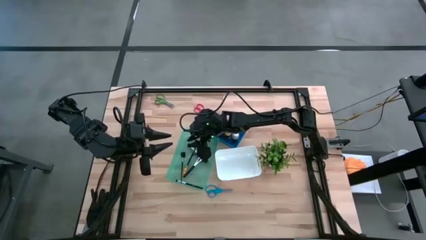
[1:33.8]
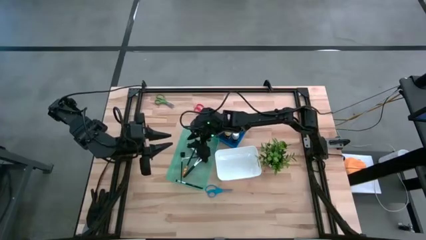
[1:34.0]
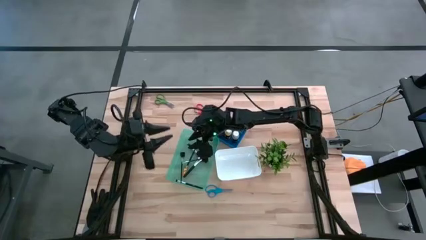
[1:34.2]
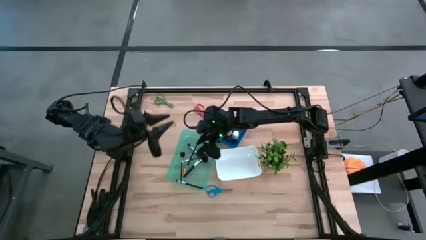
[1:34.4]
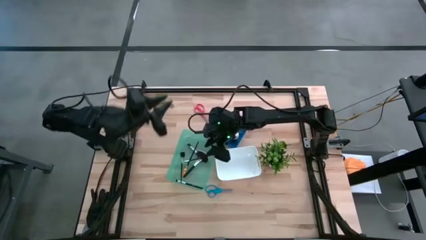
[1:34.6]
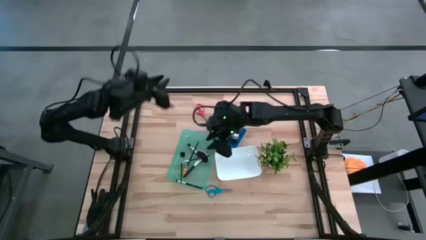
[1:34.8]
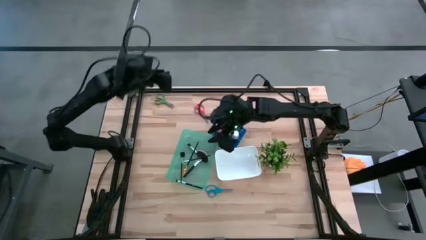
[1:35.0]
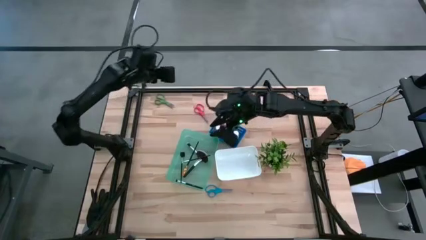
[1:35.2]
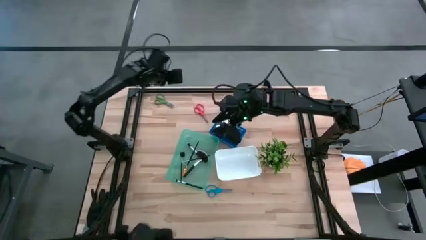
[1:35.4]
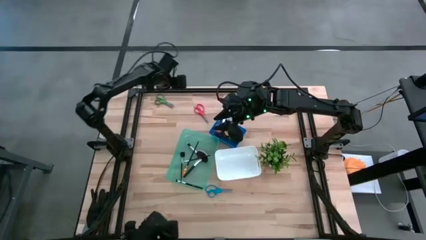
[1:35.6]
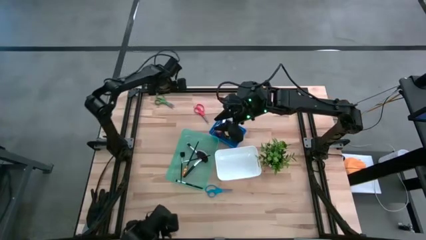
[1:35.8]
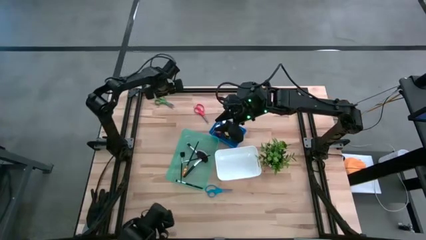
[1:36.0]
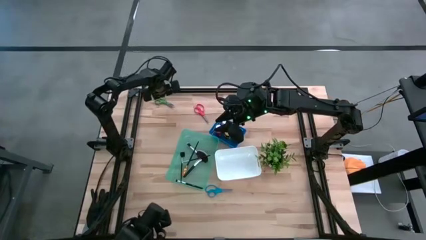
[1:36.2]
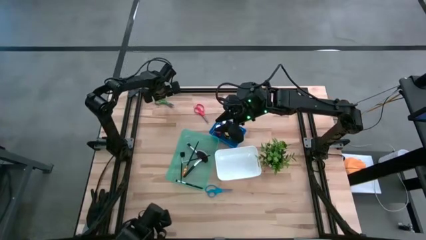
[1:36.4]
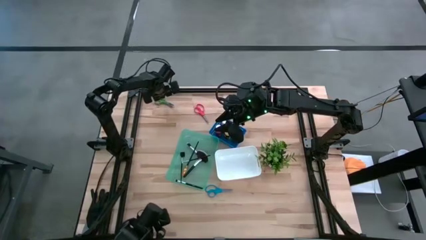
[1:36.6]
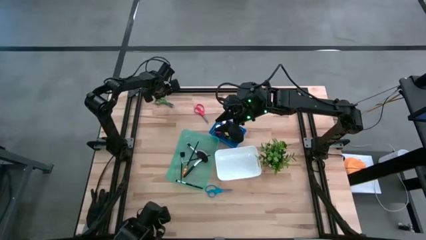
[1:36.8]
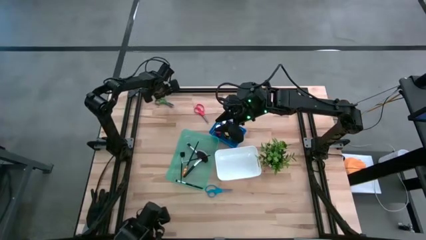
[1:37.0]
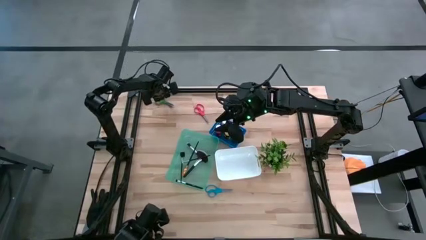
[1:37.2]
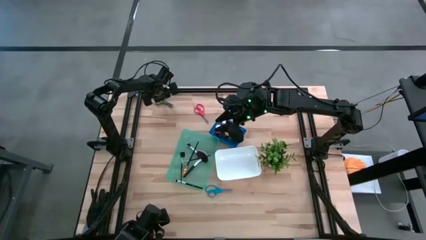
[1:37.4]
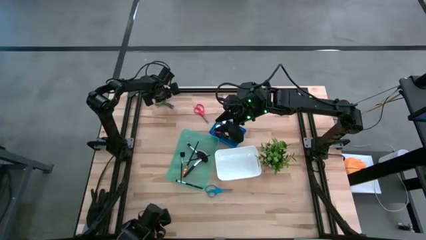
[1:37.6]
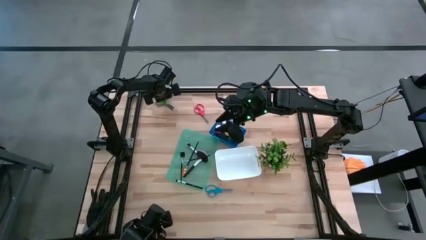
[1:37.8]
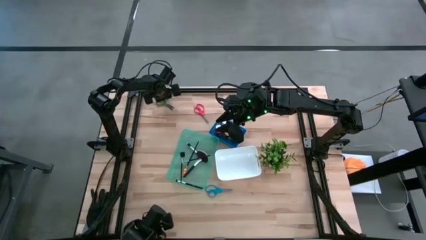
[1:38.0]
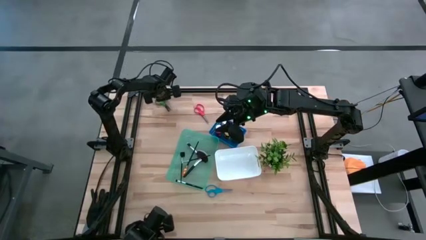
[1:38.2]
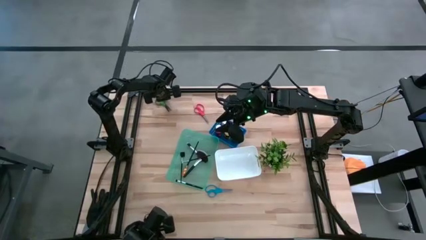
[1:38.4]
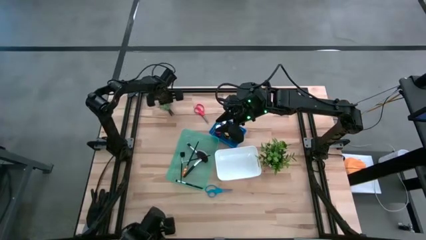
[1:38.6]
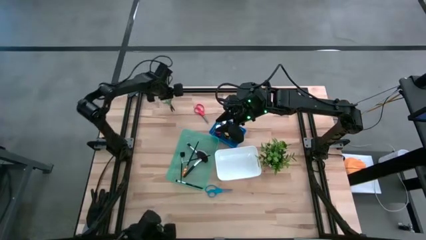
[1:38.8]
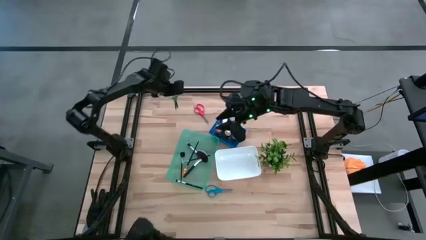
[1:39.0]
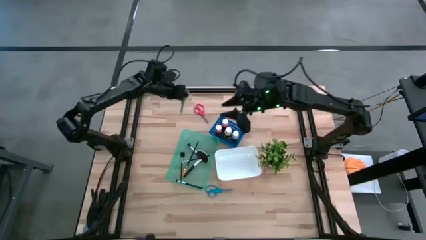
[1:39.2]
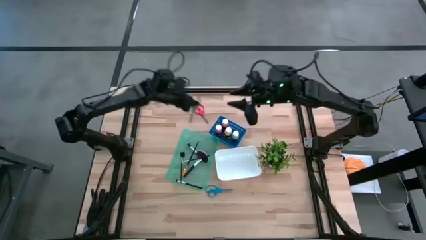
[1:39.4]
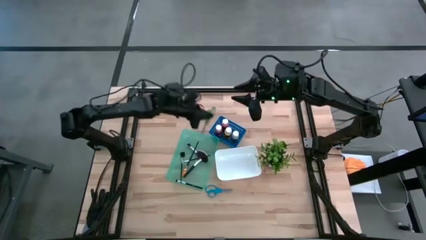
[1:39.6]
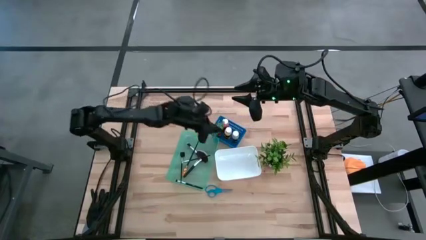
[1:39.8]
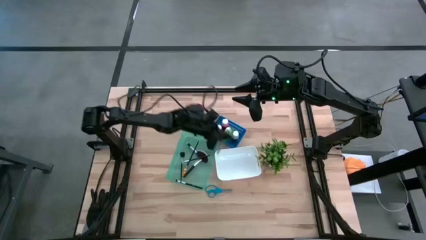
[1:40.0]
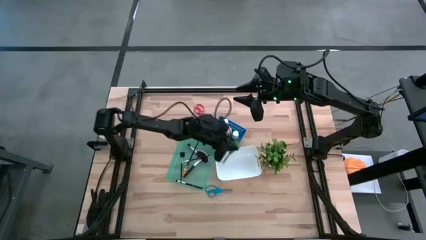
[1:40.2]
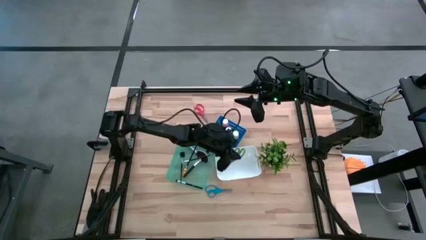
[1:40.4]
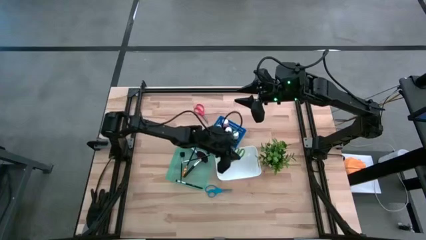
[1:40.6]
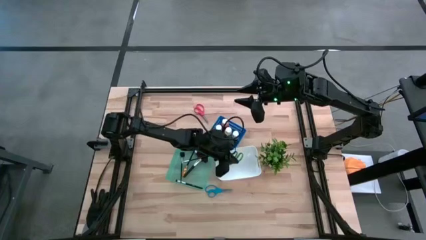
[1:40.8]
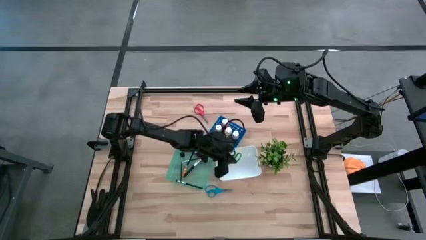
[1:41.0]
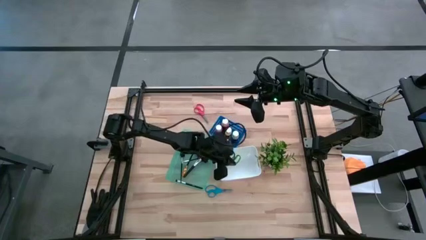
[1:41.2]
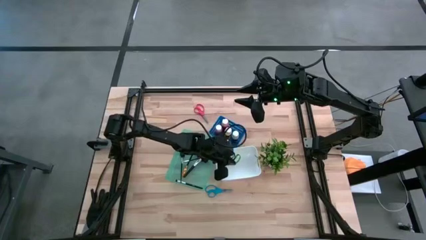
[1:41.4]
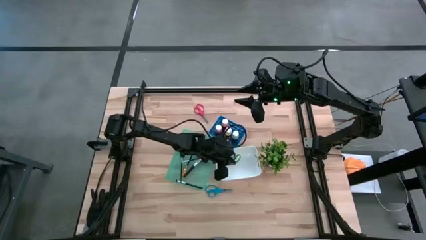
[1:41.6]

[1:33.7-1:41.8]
Task: Pick & Place Paint Supplies
Put the green scissors into the white bin

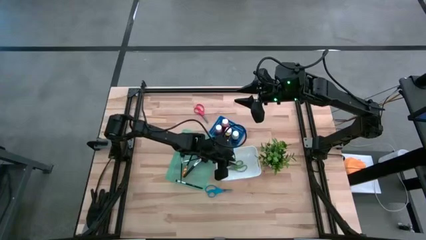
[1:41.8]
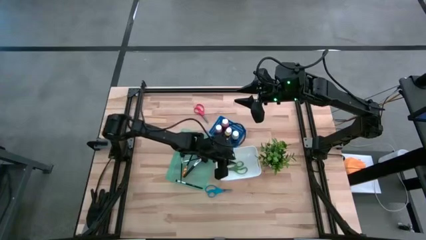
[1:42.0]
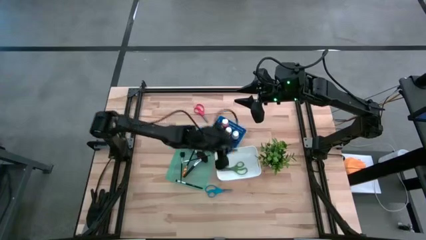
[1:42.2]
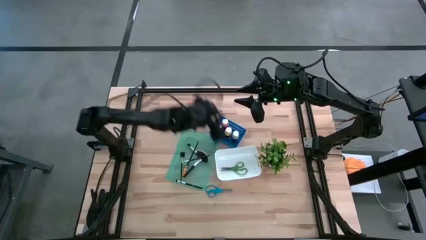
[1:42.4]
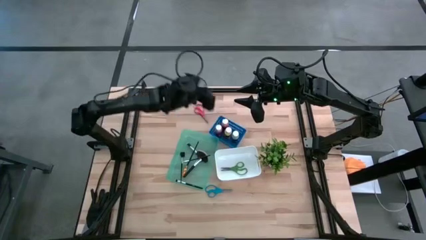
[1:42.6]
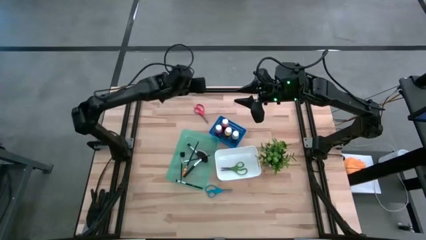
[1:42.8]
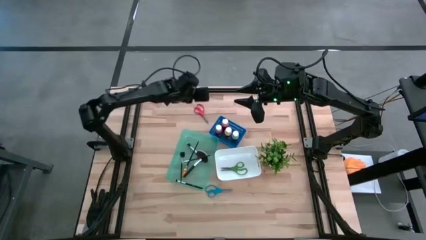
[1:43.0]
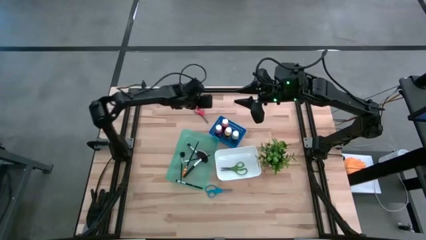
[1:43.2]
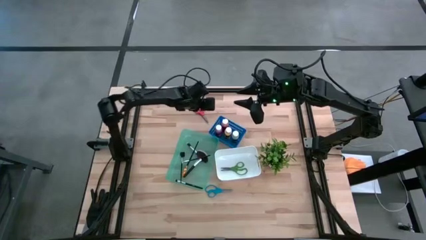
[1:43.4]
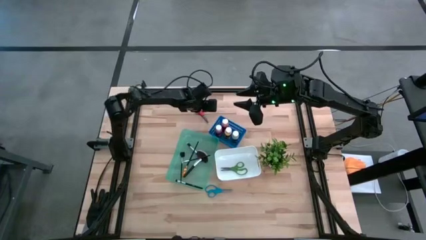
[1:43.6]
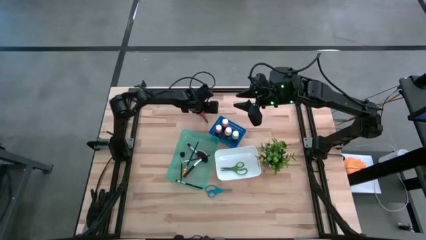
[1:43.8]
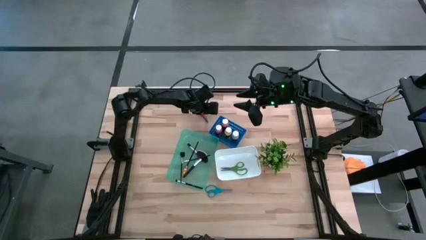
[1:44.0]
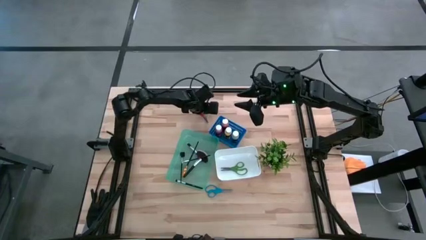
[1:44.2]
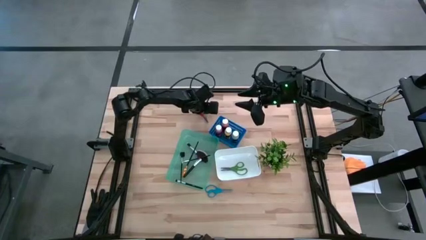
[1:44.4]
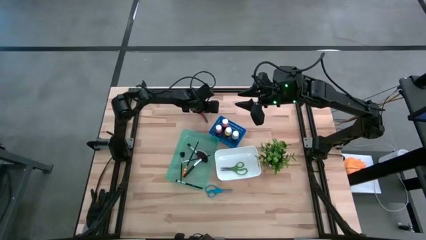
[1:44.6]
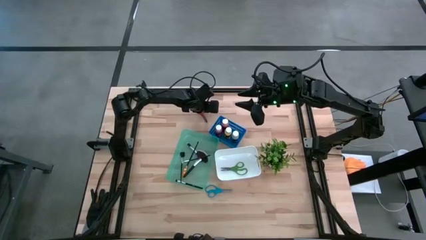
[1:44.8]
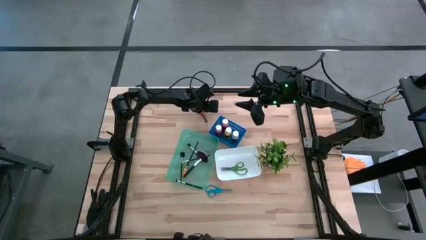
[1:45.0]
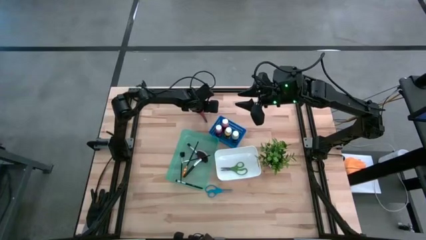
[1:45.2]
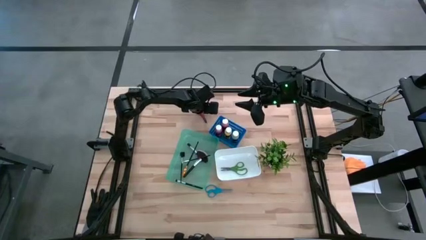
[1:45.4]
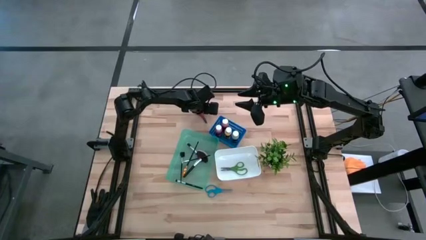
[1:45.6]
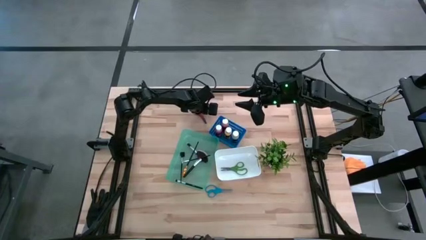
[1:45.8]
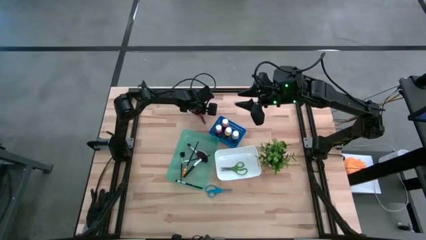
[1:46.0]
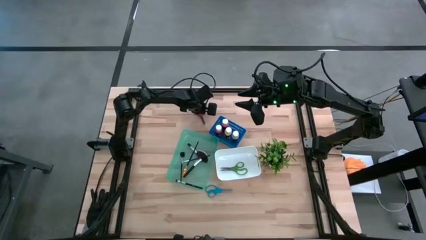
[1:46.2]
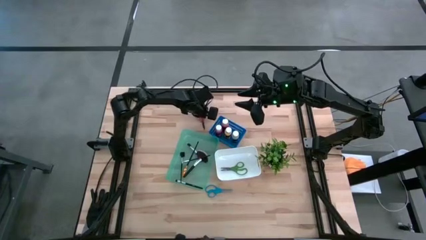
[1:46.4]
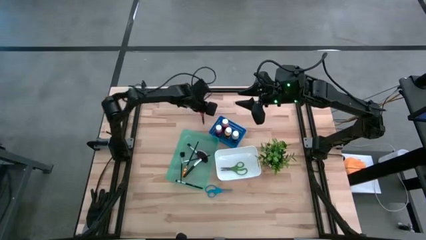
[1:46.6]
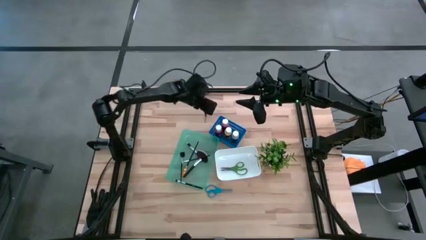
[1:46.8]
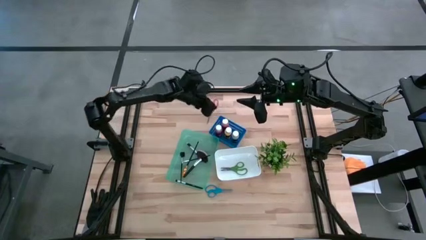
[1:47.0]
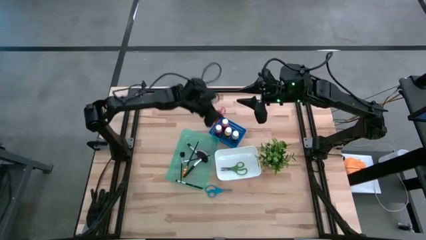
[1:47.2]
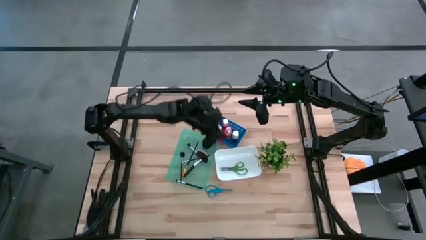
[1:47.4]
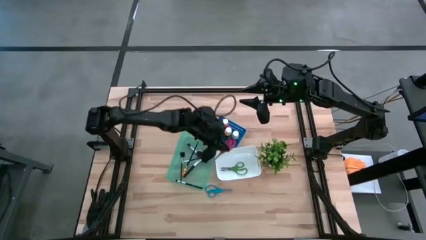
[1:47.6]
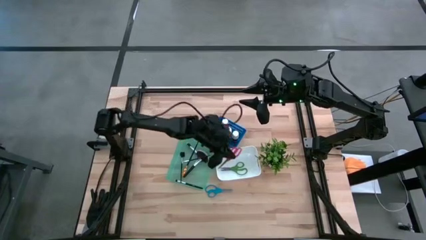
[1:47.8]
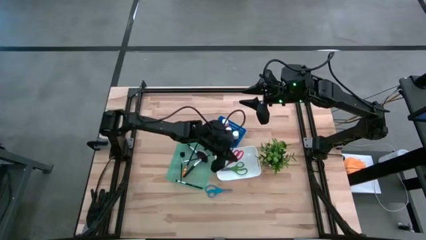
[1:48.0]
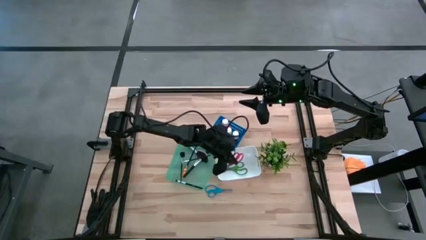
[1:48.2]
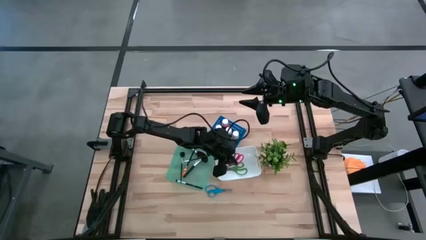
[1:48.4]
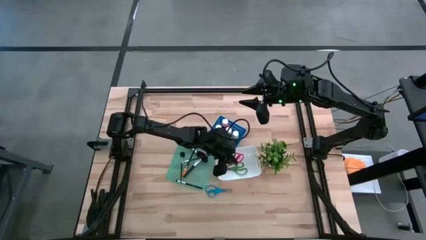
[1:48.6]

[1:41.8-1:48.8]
Put the red scissors into the white bin

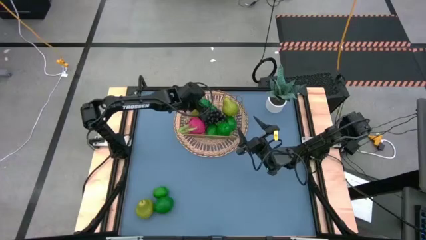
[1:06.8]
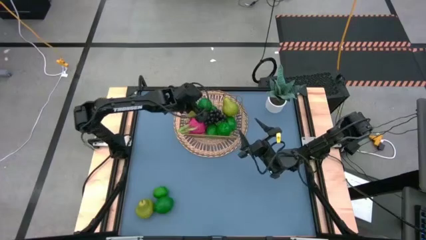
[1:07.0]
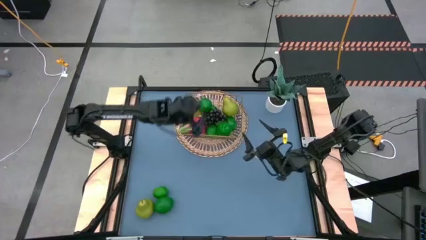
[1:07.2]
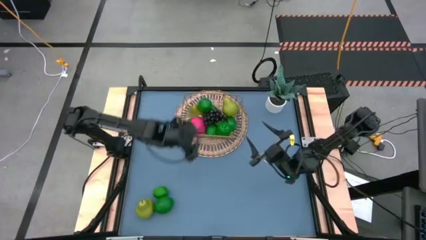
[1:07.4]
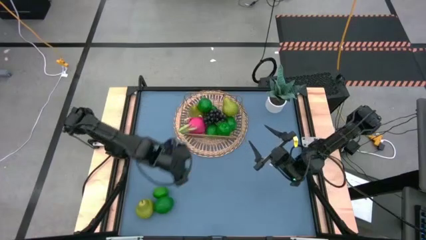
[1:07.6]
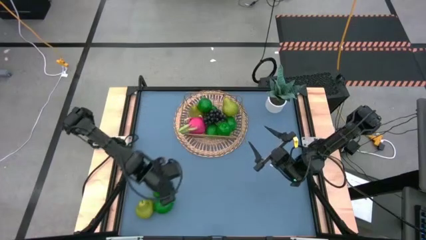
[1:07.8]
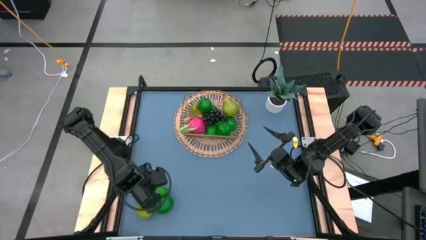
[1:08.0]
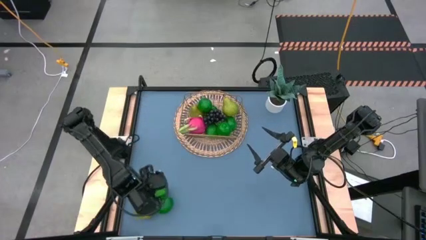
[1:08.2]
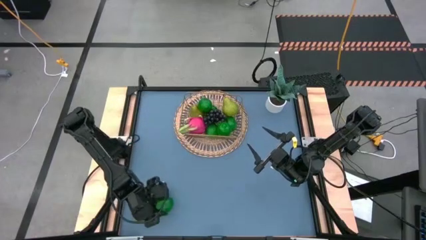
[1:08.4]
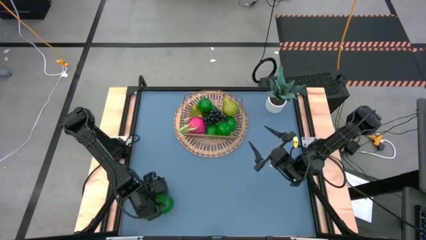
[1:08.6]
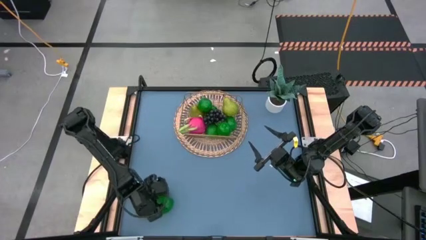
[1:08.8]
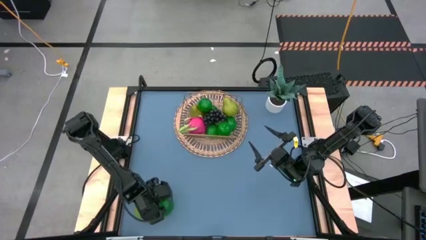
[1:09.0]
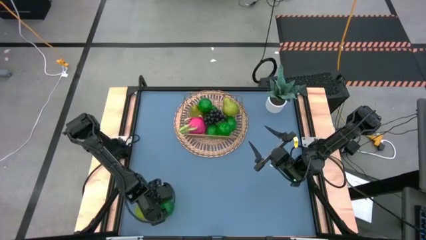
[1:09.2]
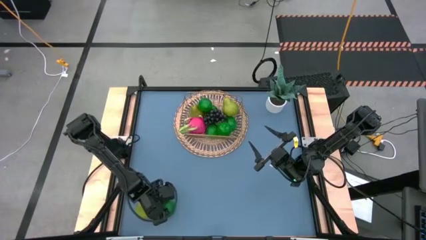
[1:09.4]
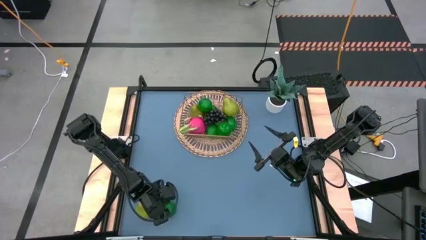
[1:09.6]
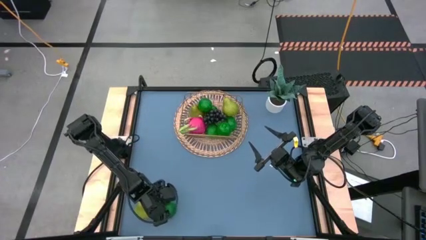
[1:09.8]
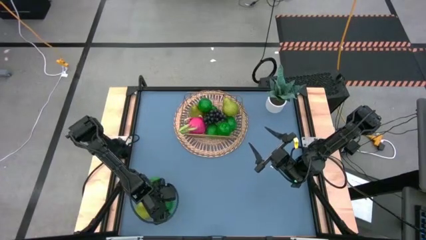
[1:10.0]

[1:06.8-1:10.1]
Task: Build produce basket
Put the green lime into the gold wire basket
